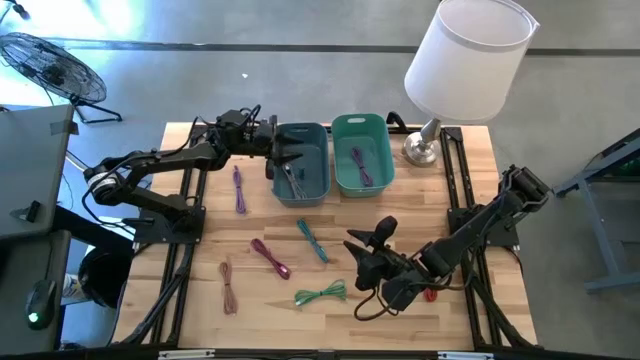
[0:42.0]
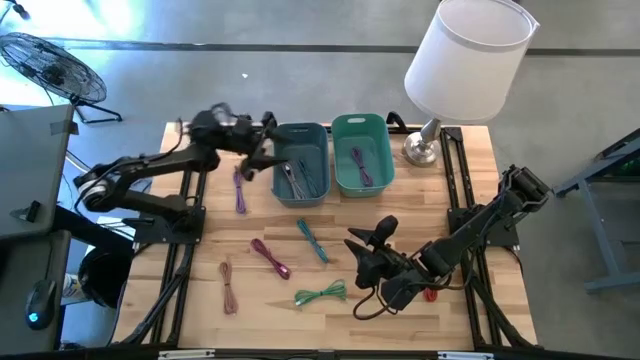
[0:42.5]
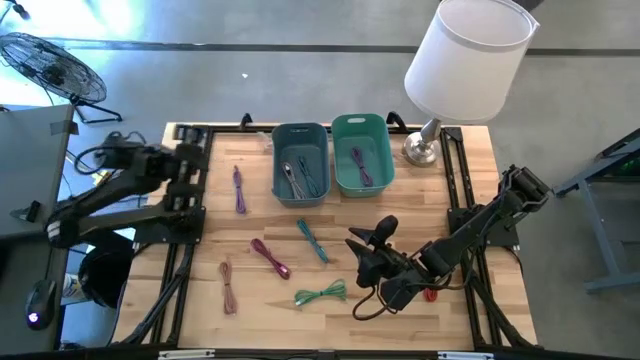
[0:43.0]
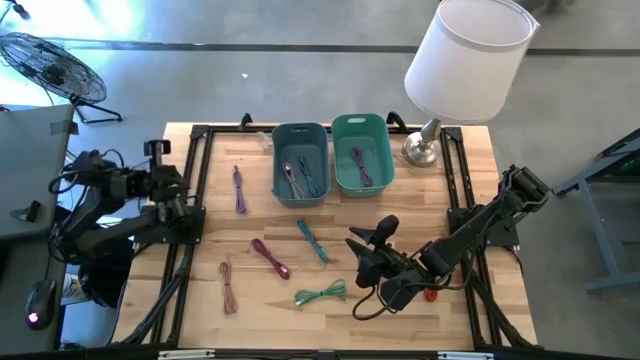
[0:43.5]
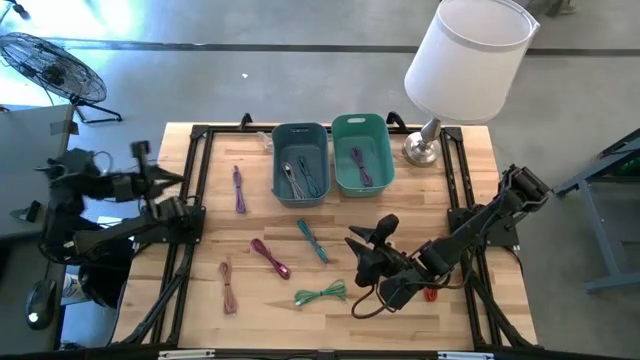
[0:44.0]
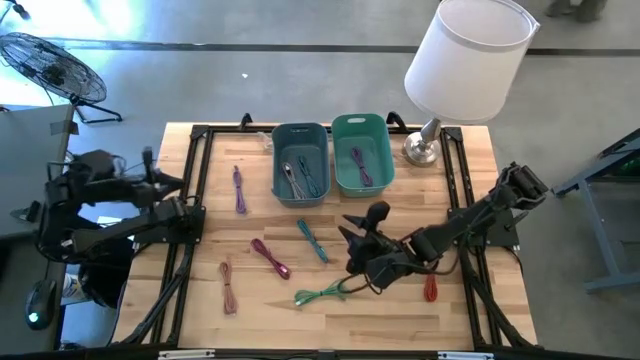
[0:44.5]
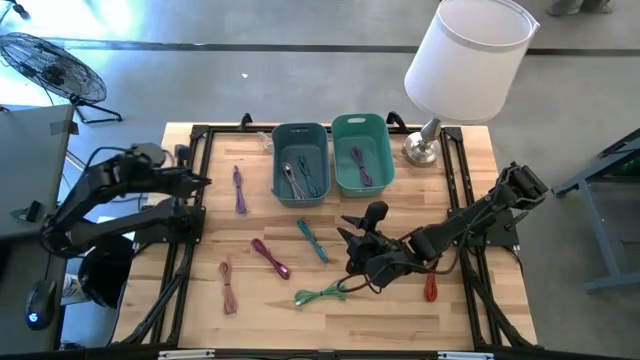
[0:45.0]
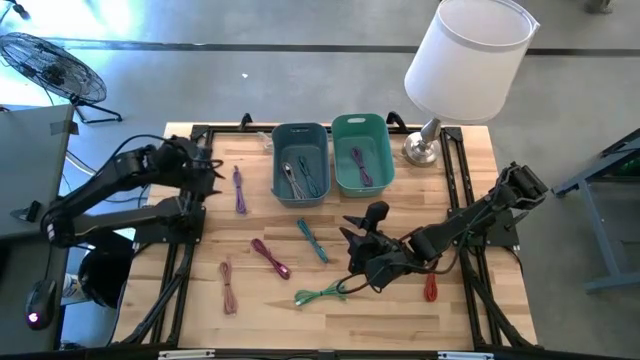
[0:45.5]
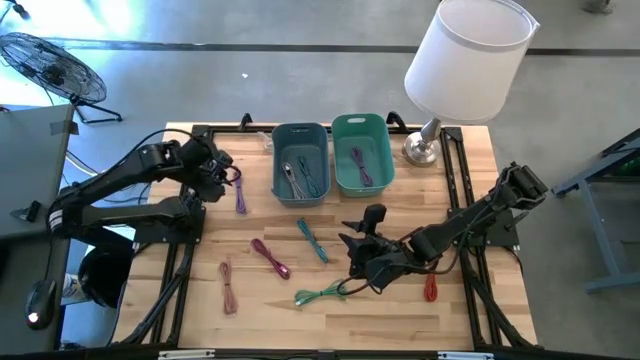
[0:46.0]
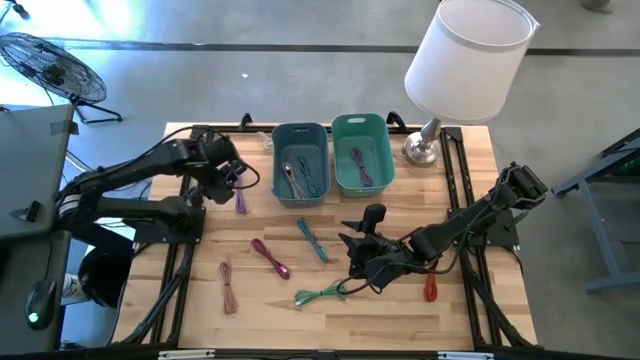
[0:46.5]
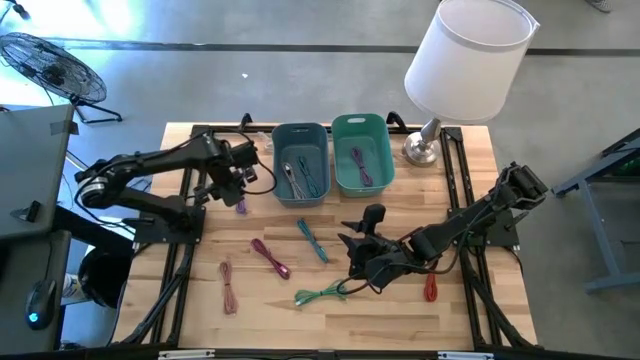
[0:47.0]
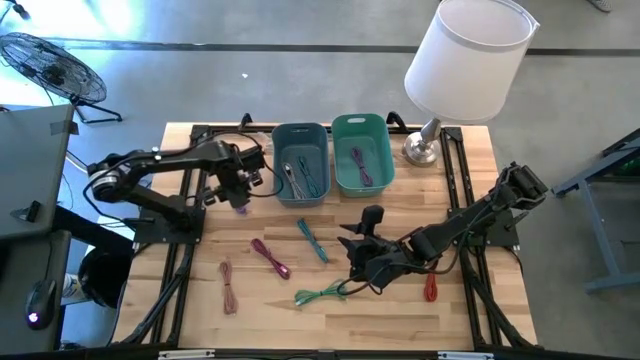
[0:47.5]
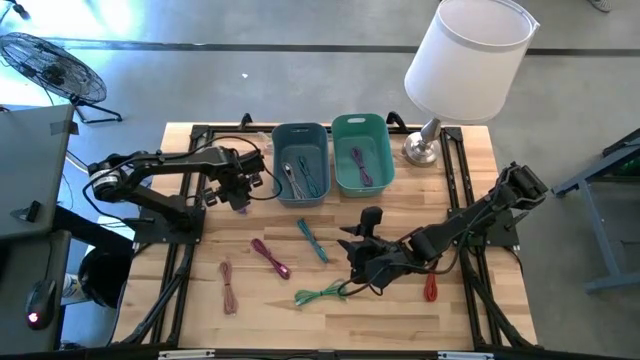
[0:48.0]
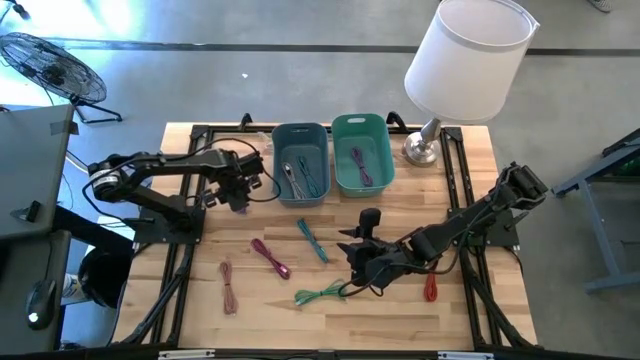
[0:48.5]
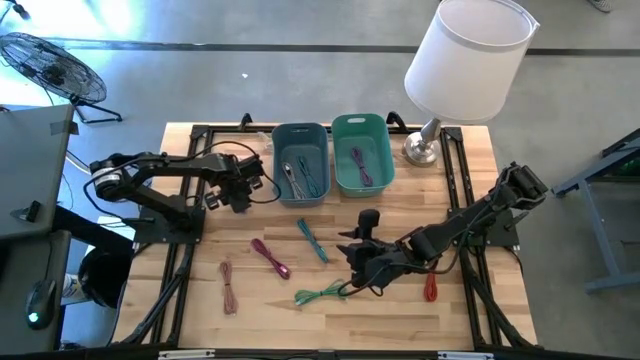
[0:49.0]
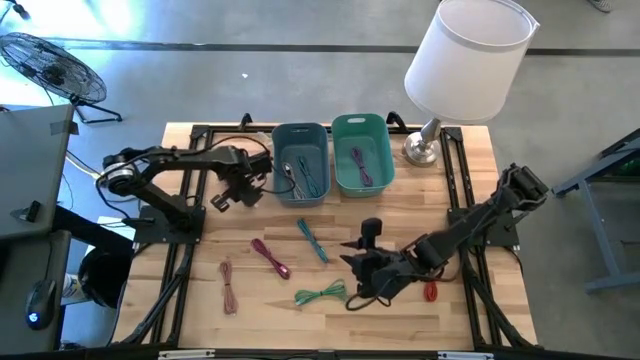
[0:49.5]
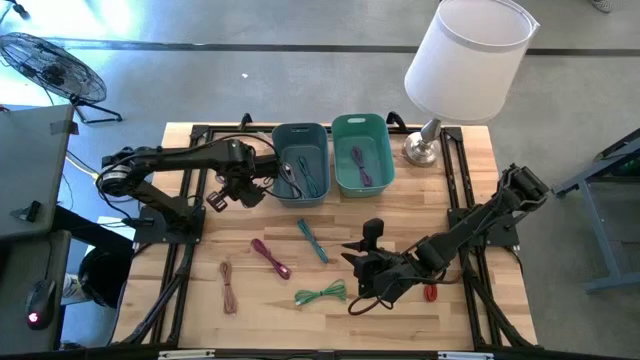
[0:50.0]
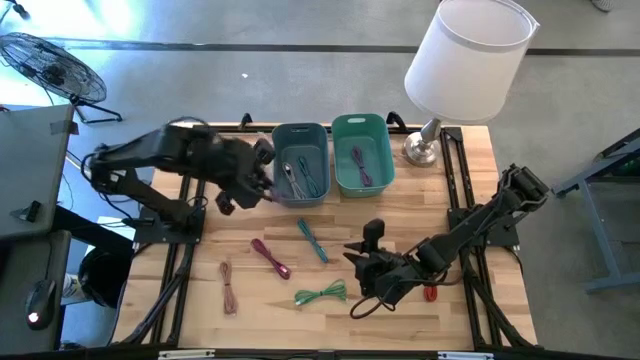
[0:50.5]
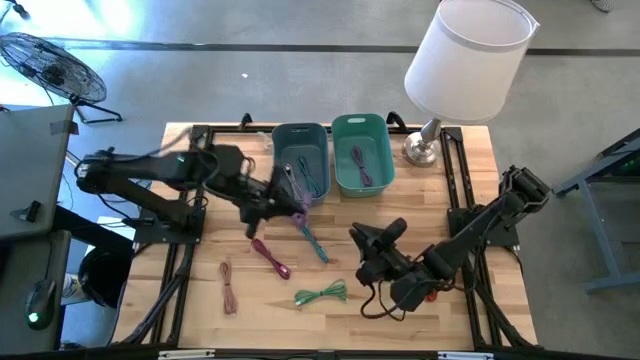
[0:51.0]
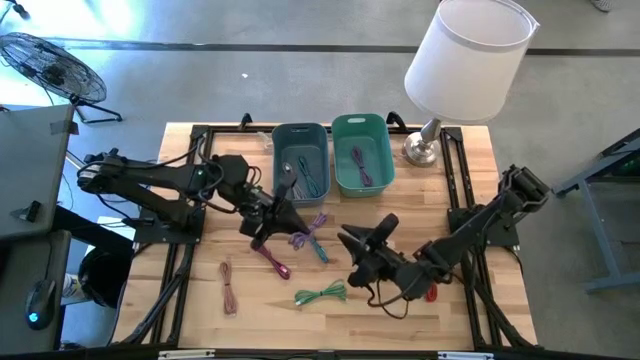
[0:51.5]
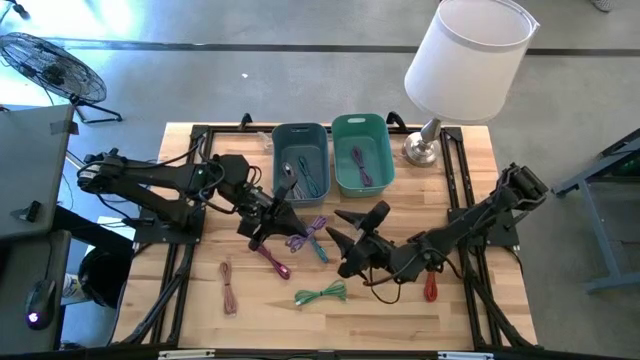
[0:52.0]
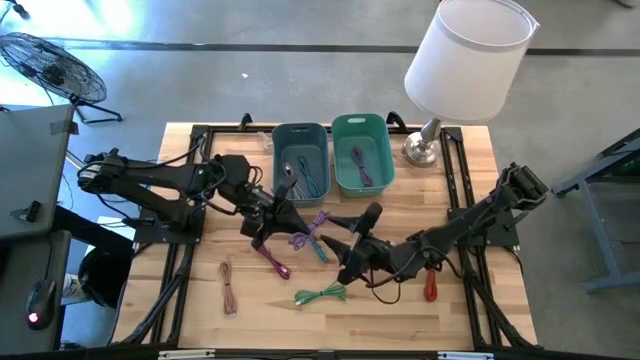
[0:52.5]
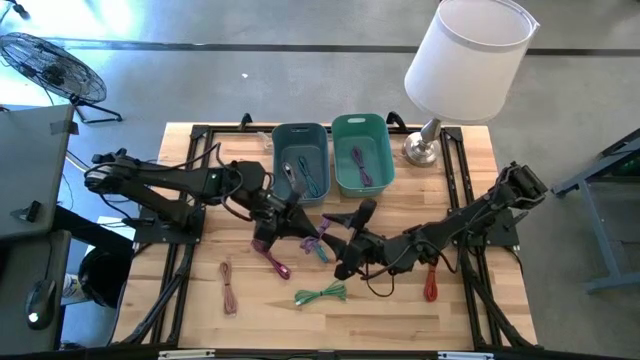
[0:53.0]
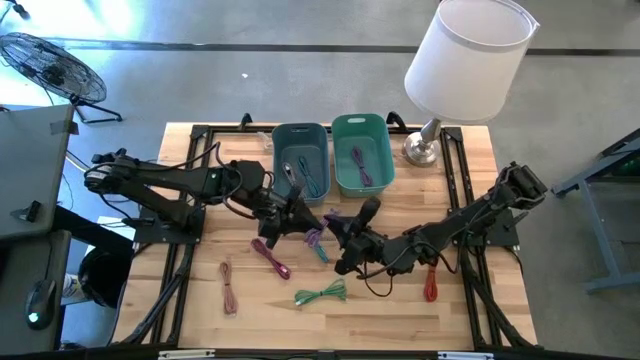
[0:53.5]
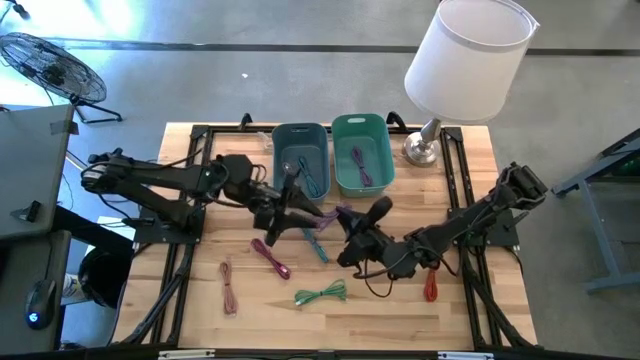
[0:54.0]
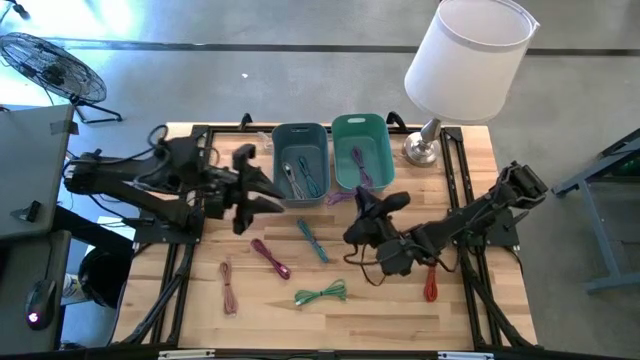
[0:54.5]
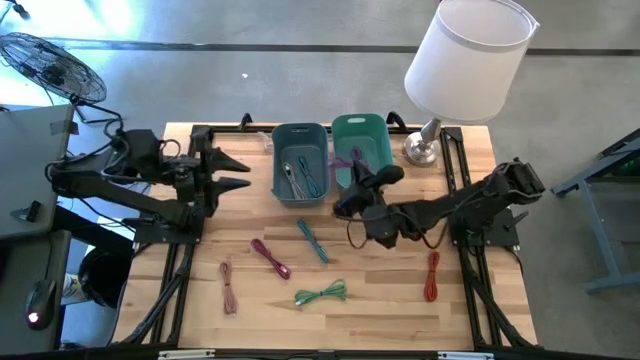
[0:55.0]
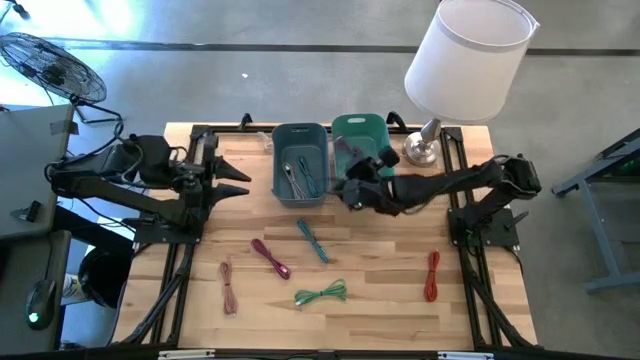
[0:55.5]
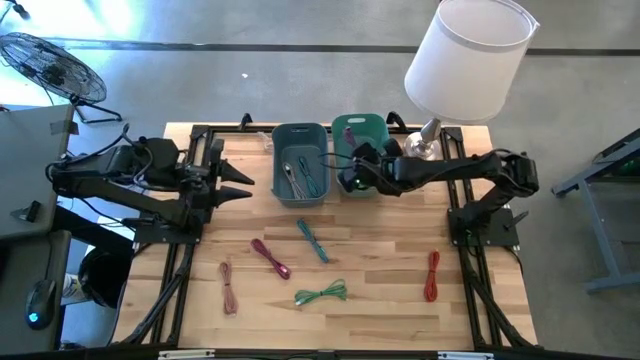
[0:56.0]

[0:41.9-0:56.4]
Task: Pick & Place USB Port
Put the violet charger cable into the green bin

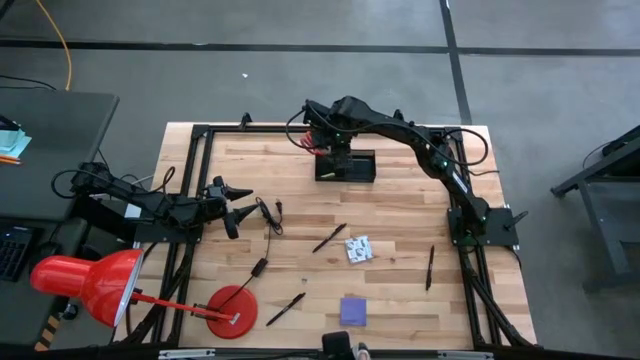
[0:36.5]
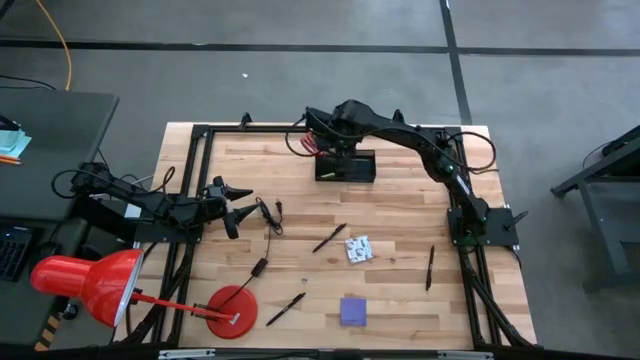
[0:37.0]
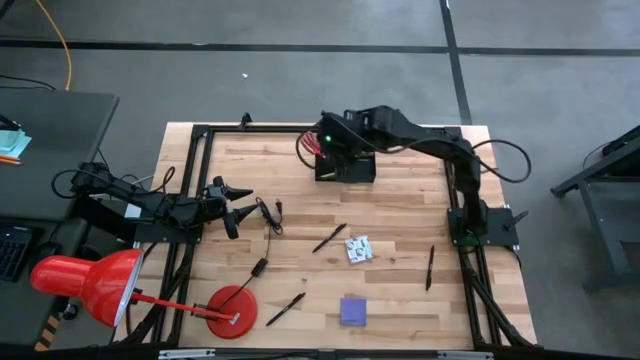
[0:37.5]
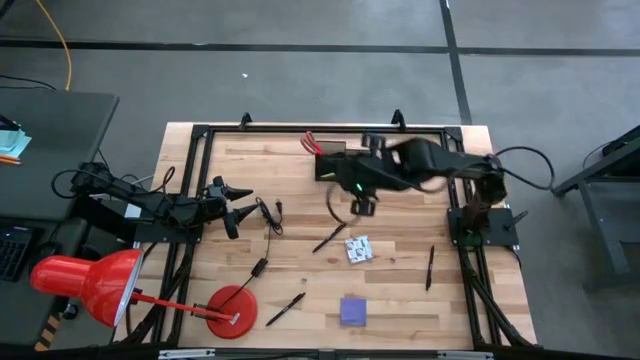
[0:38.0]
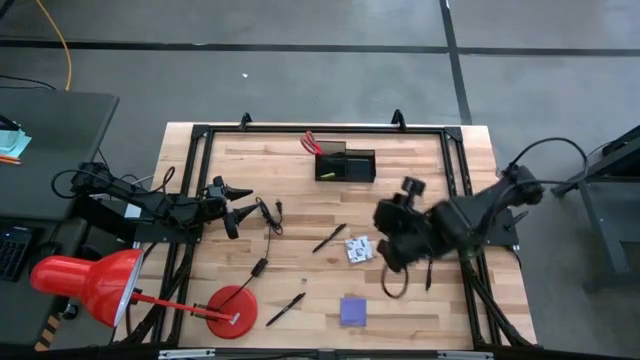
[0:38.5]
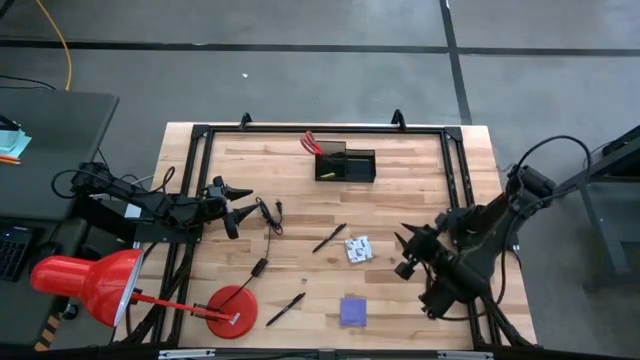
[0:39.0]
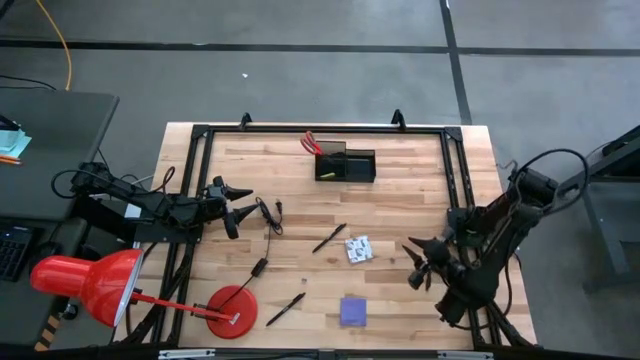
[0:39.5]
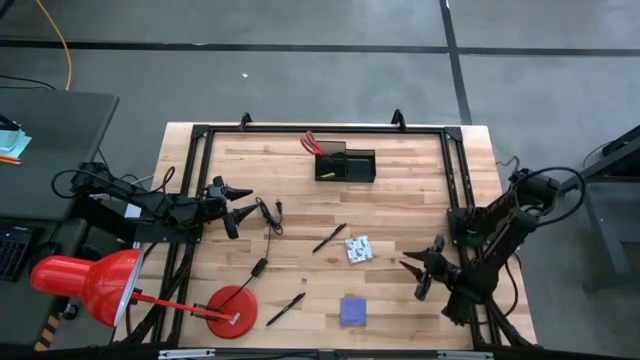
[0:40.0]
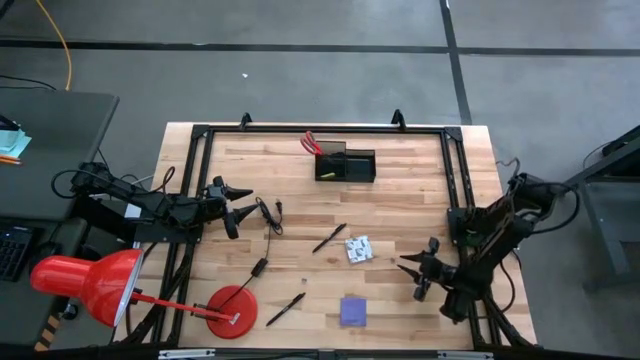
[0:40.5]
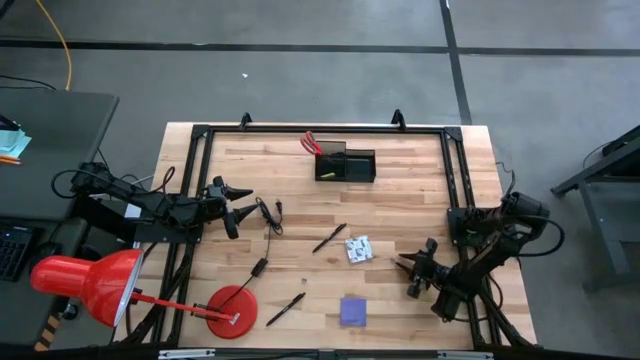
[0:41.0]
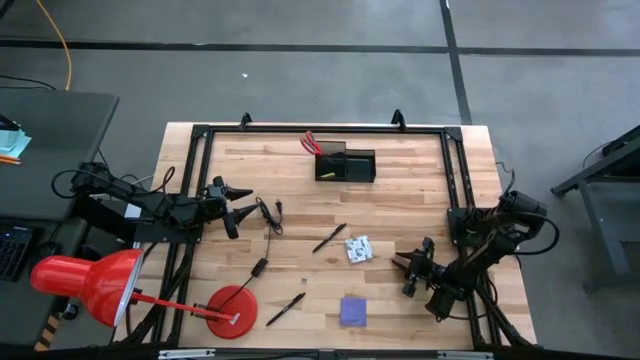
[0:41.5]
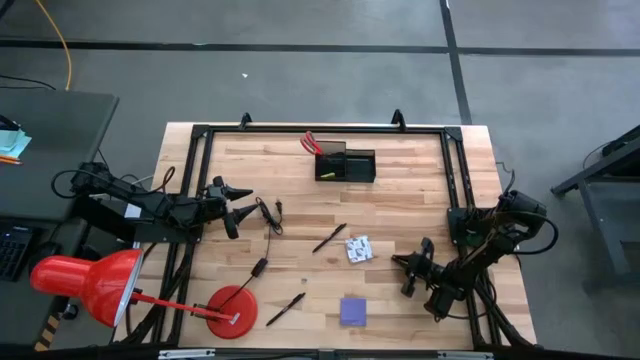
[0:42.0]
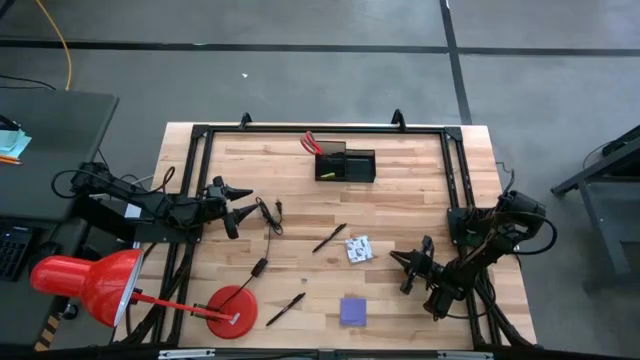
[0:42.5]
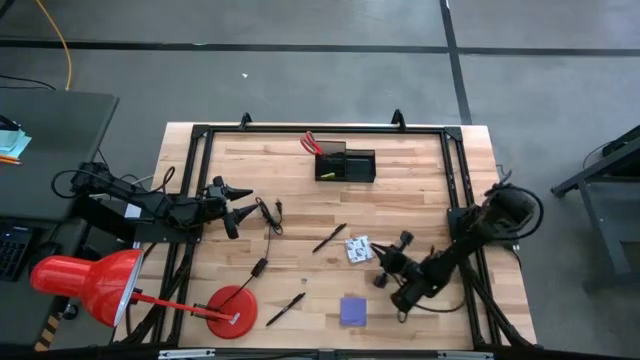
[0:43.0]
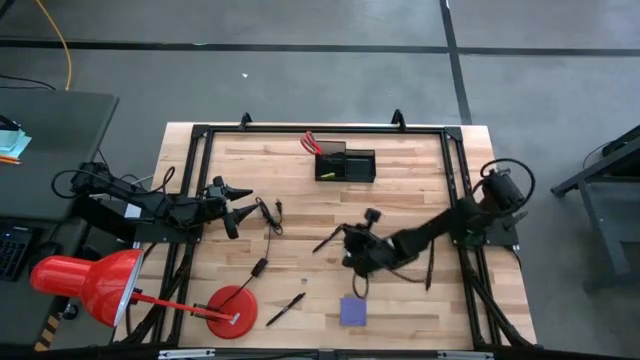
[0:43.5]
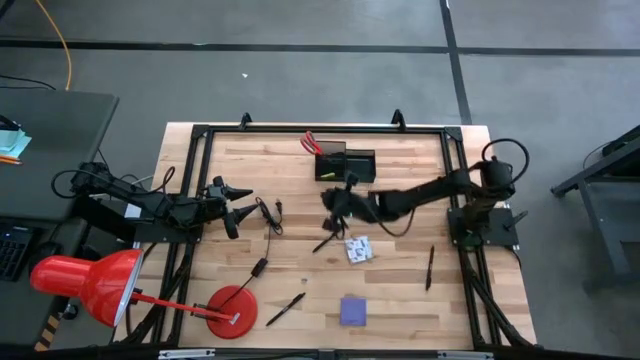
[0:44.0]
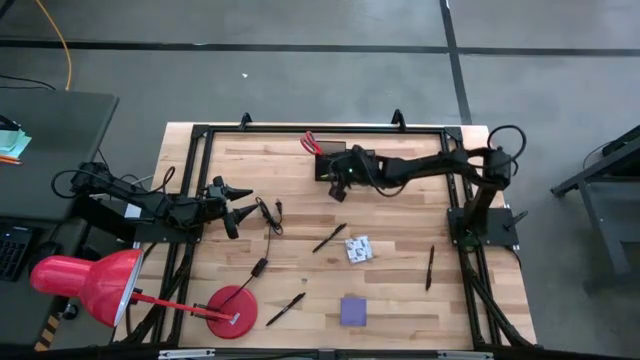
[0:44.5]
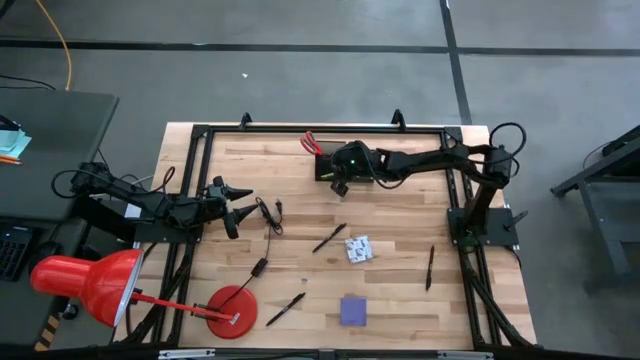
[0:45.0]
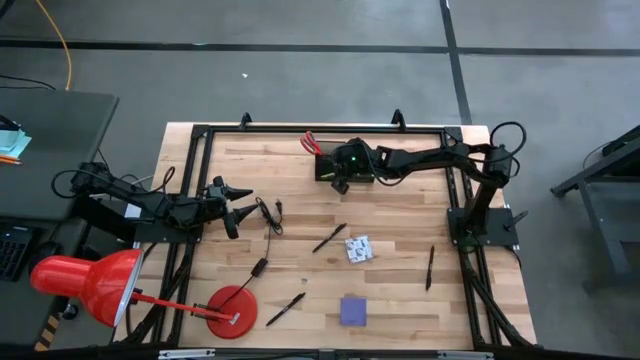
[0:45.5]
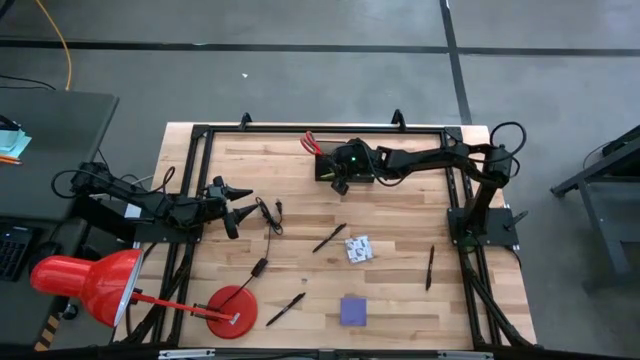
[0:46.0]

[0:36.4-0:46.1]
Task: Pick and place office supplies into organizer
Put the pink binder clip into the mesh desk organizer
